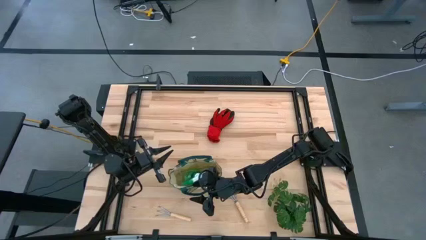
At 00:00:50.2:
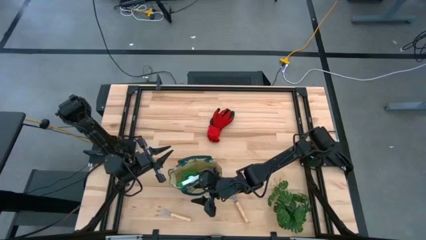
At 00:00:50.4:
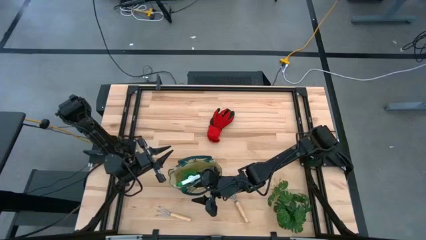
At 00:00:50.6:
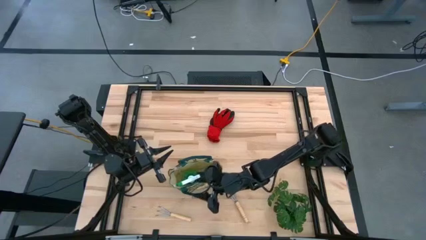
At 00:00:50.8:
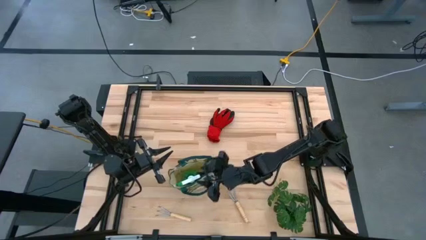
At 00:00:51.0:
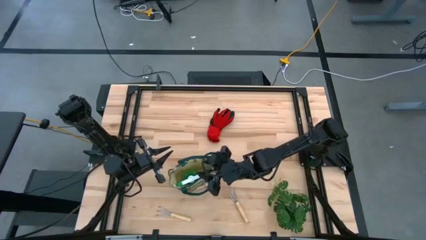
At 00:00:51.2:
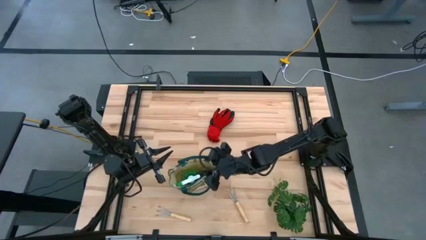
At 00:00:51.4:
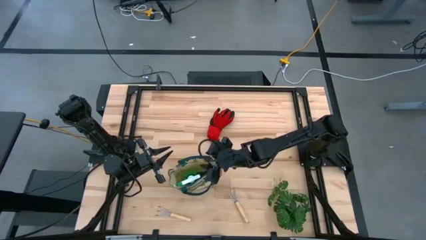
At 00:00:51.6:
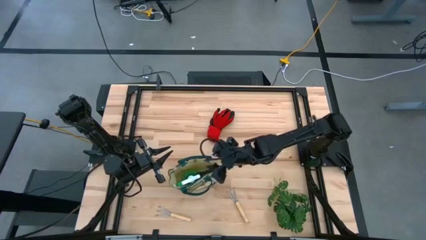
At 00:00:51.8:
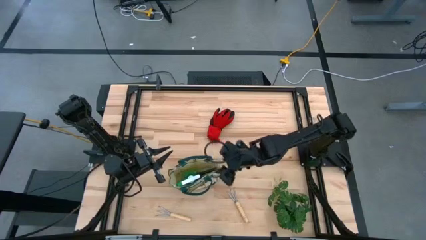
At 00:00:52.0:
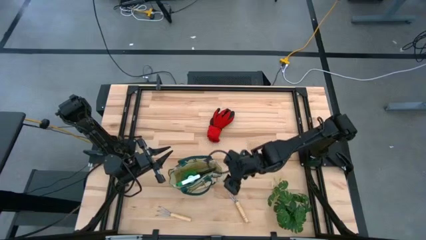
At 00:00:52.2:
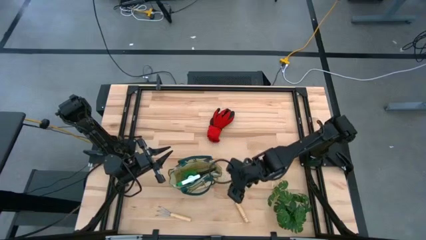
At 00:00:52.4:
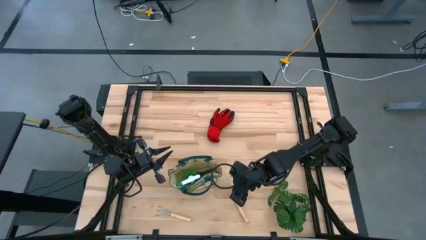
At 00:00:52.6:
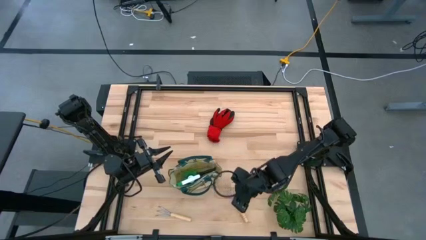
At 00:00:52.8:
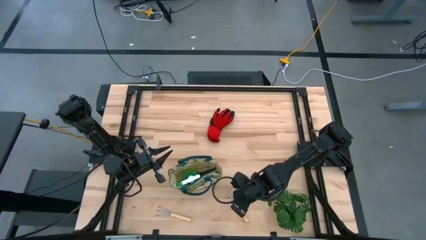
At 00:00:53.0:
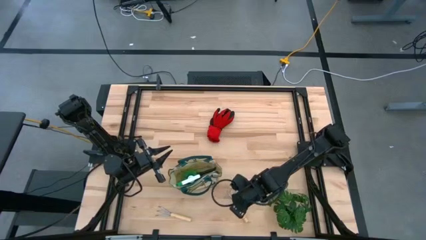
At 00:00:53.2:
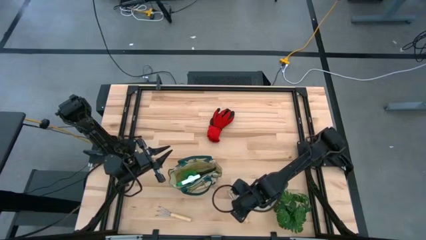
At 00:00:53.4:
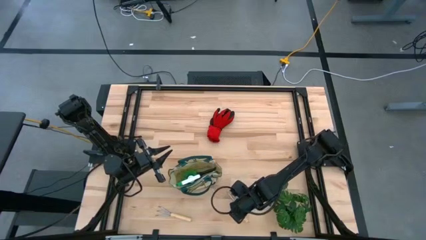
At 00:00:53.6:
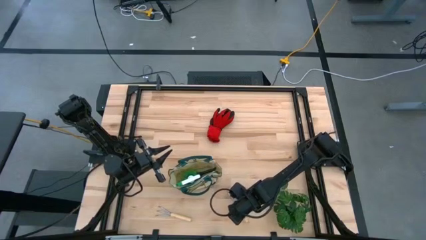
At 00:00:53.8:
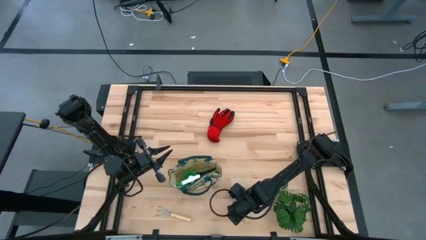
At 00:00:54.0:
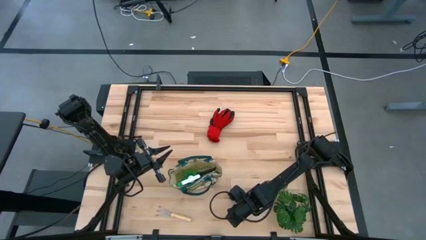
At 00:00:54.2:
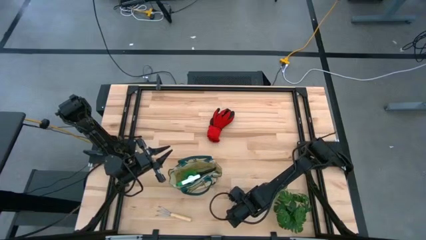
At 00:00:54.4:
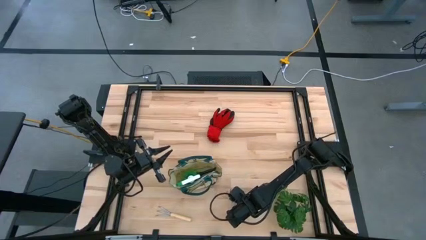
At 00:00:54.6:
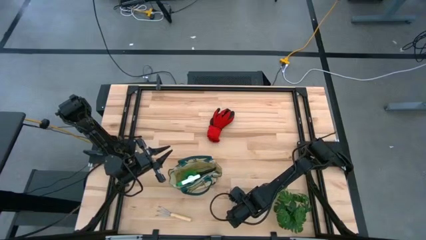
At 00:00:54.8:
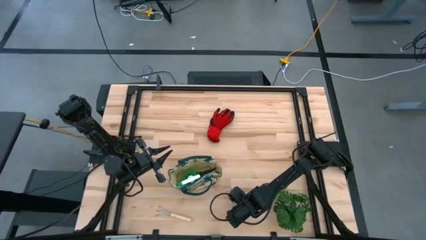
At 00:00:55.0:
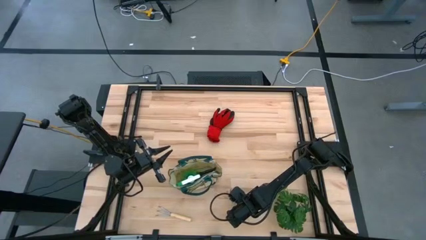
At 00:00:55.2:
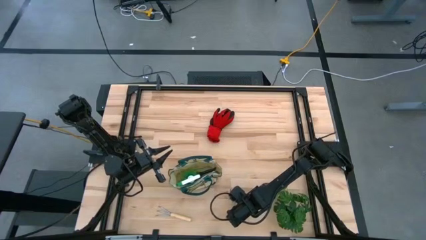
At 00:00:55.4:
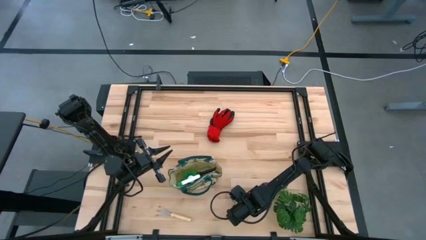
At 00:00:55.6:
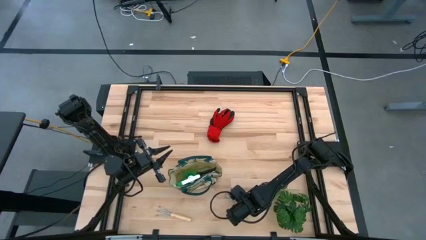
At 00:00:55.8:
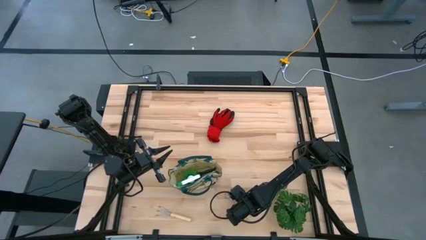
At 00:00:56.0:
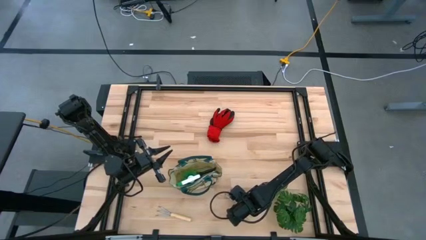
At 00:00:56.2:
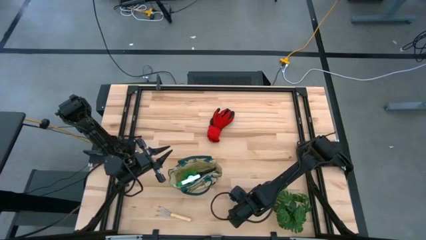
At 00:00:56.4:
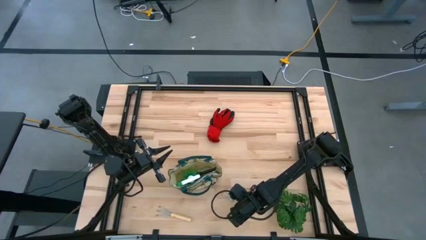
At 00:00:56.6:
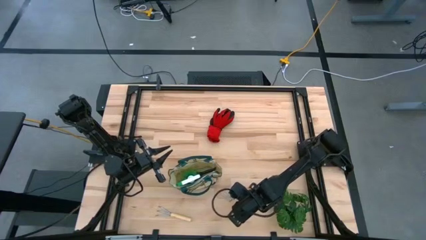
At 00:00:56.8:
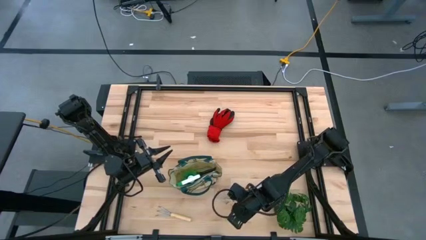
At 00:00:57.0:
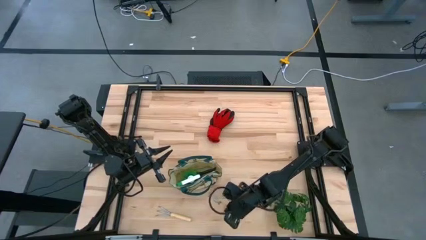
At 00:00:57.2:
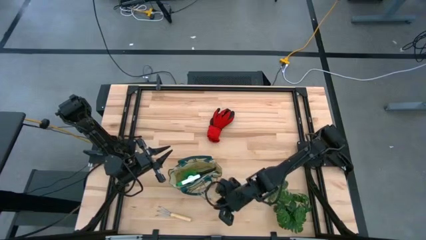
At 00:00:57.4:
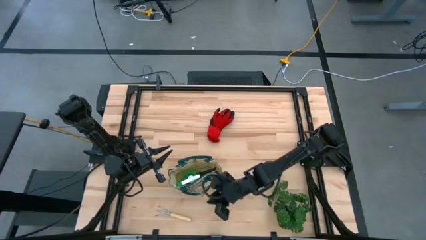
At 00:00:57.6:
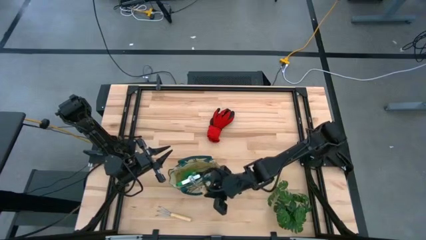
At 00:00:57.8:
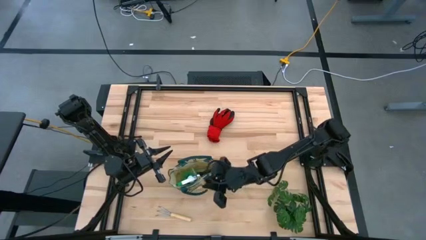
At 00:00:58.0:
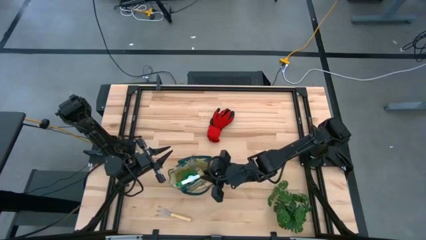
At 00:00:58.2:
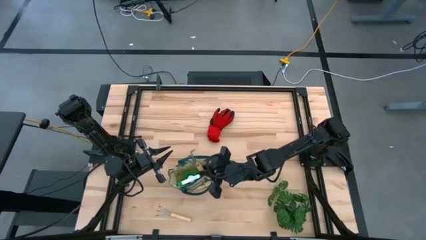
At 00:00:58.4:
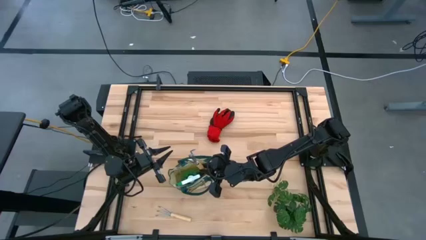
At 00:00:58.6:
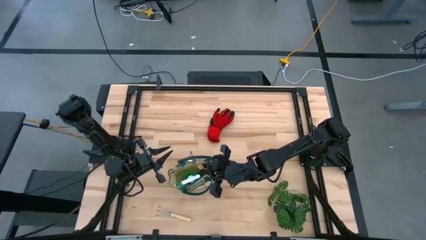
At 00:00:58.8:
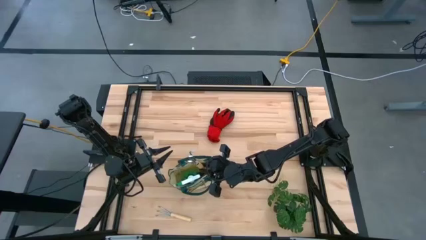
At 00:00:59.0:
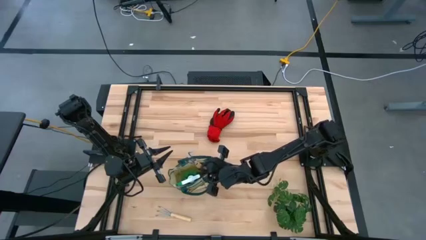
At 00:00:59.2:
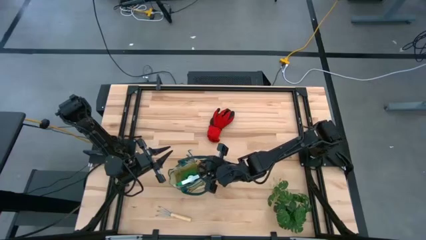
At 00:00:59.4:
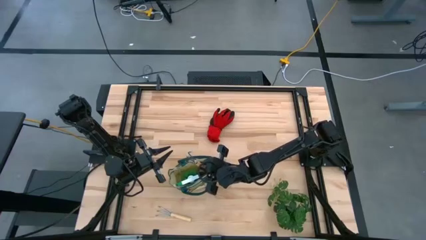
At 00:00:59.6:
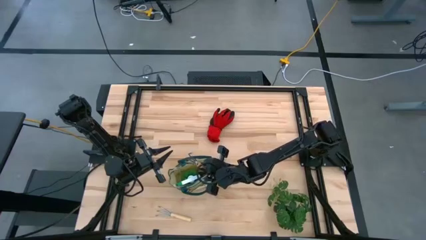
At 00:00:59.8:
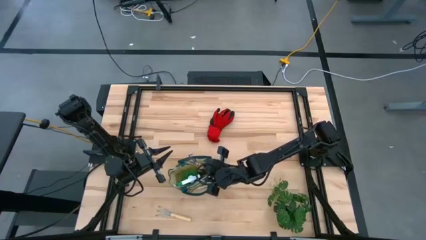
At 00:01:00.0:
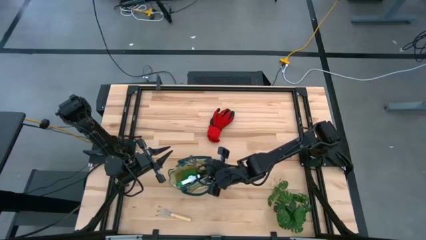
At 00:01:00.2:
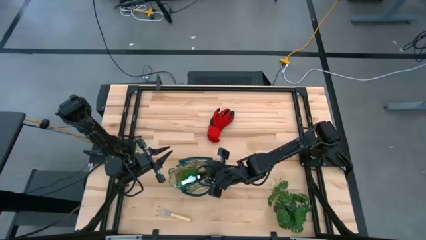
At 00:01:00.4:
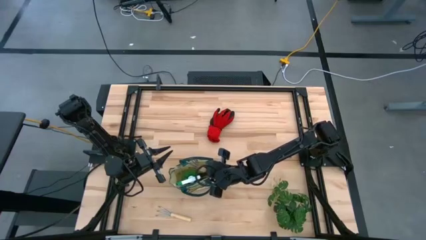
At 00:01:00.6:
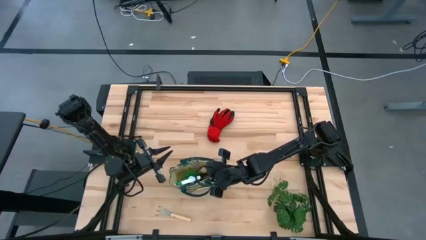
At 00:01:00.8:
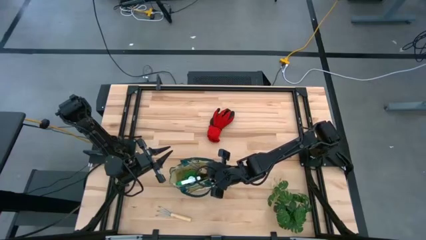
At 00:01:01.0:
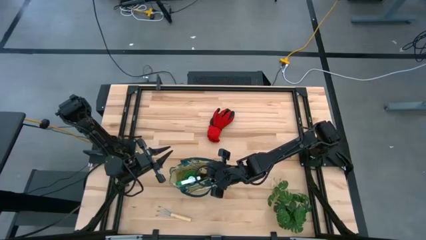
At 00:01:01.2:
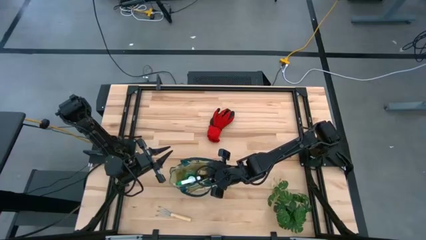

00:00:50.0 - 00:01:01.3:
Task: Pick & Place Garden tools in Gardening bag
Put the right hand rake into the gardening bag
